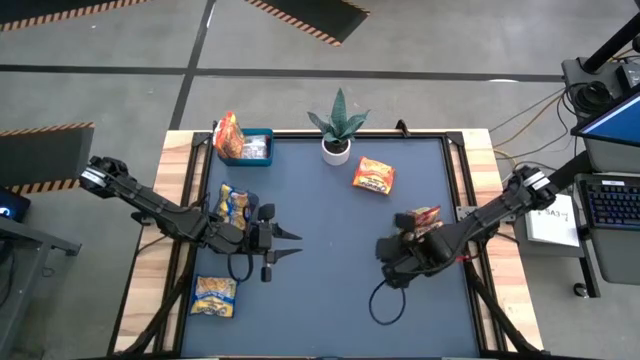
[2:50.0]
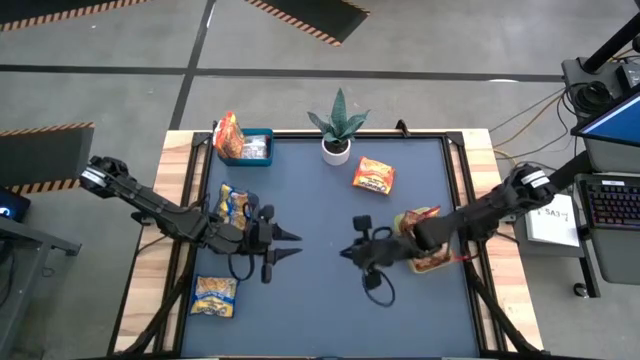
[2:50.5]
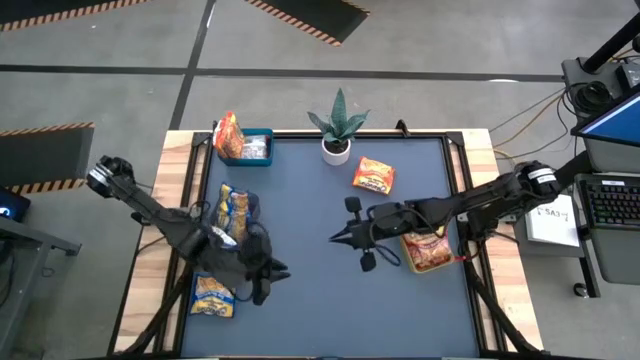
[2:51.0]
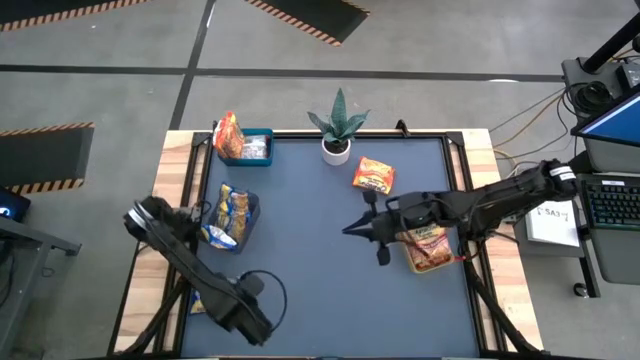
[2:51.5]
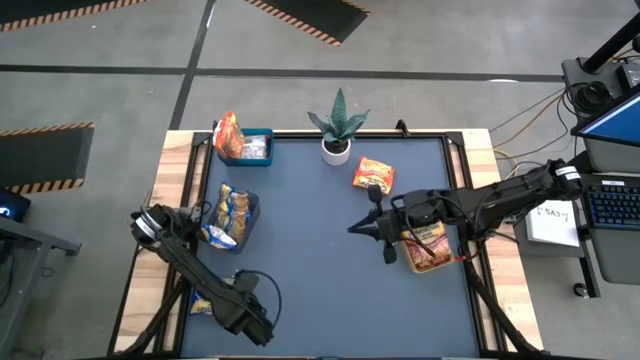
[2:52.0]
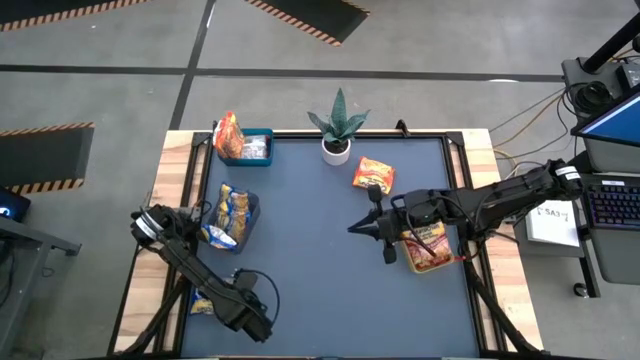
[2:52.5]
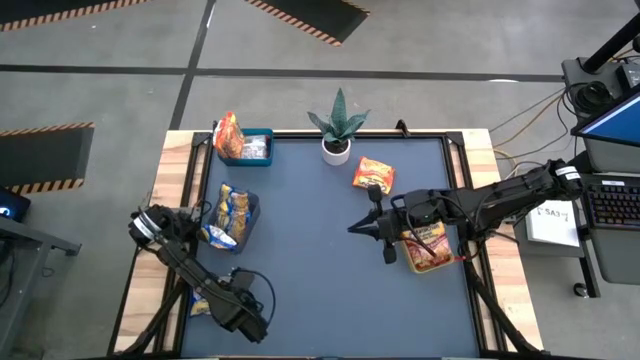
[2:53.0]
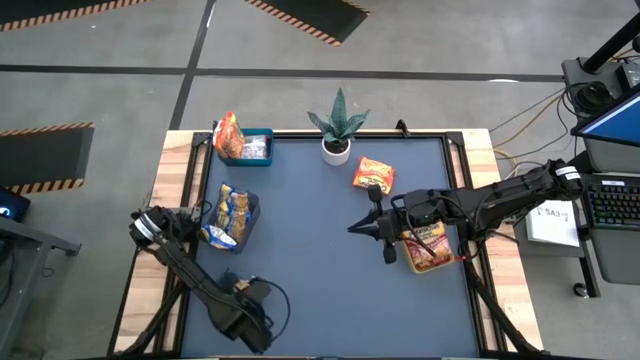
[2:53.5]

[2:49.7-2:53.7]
Task: Sort Maruchan noodles
Put the blue noodle pack into the black bin

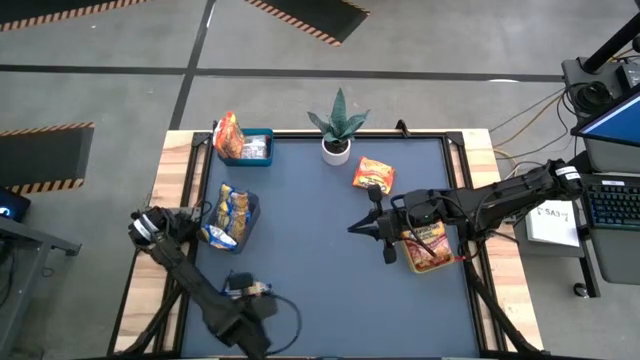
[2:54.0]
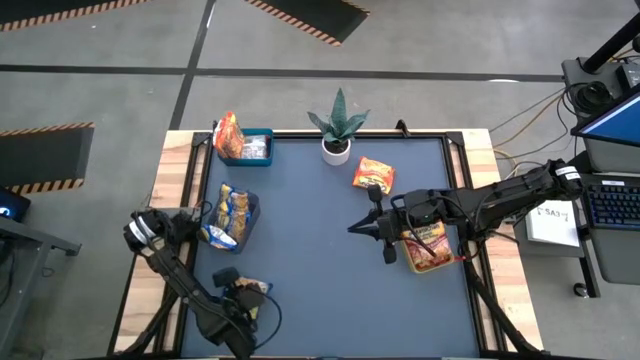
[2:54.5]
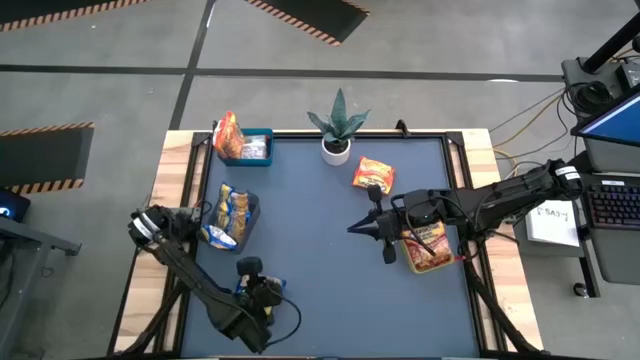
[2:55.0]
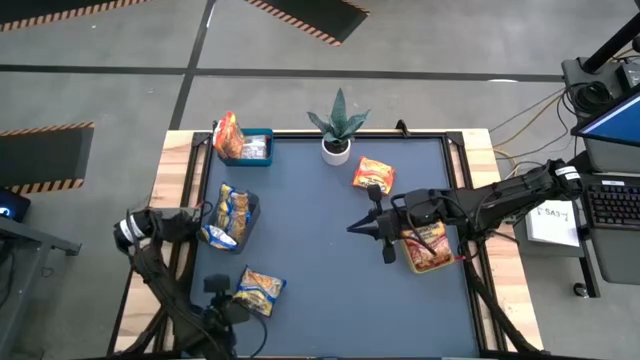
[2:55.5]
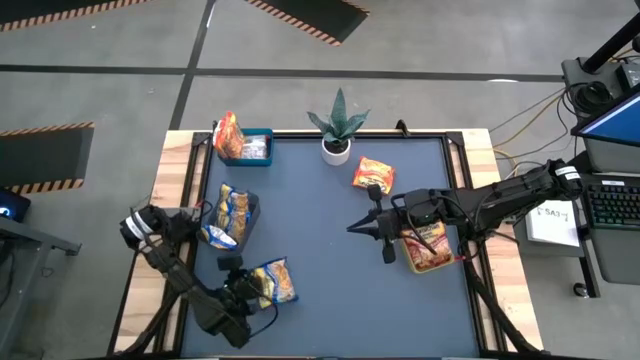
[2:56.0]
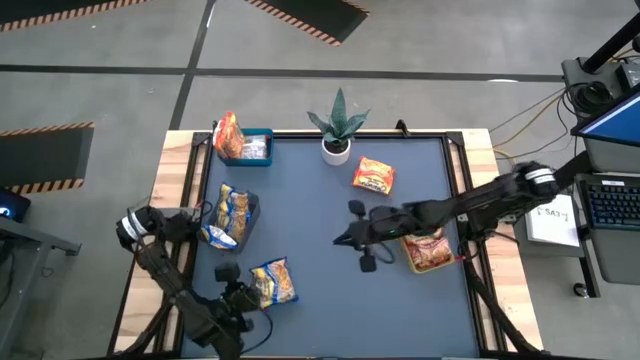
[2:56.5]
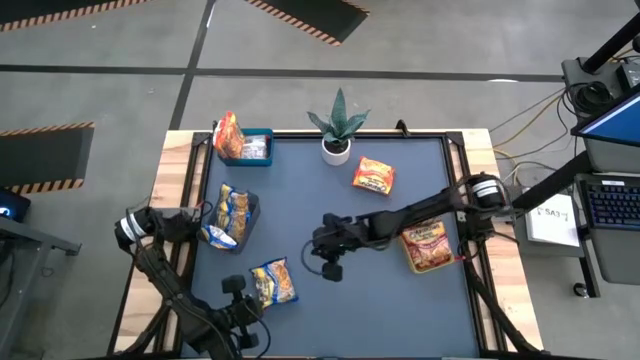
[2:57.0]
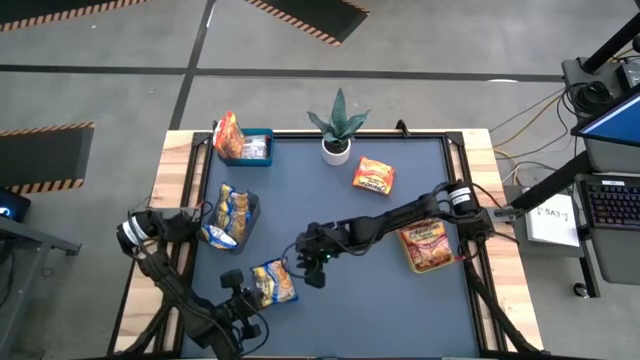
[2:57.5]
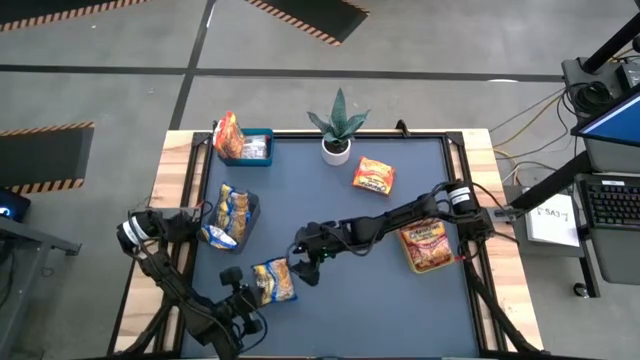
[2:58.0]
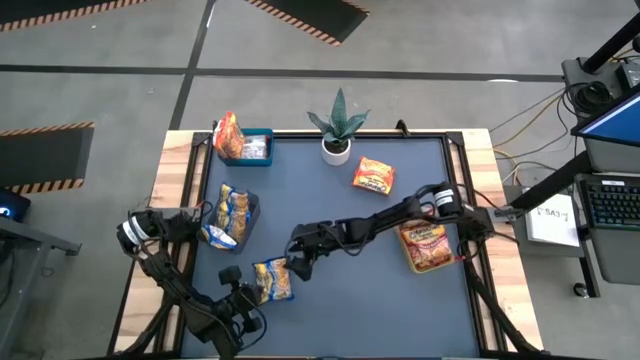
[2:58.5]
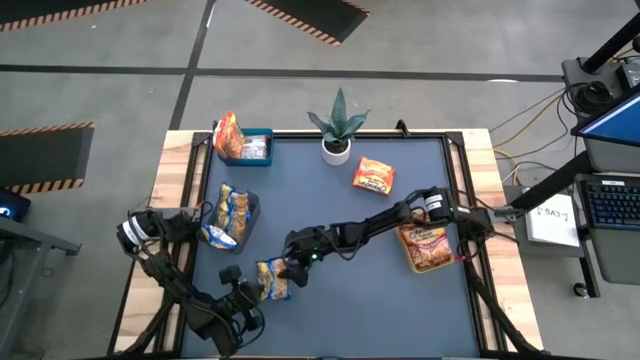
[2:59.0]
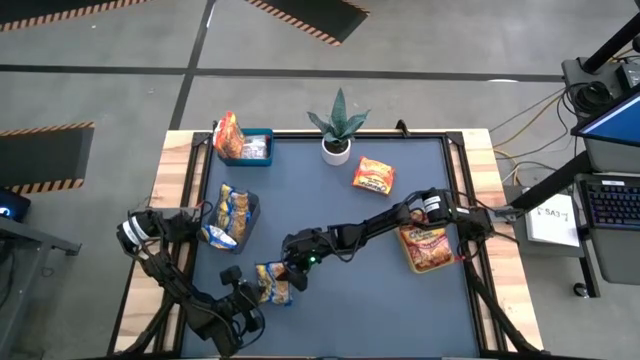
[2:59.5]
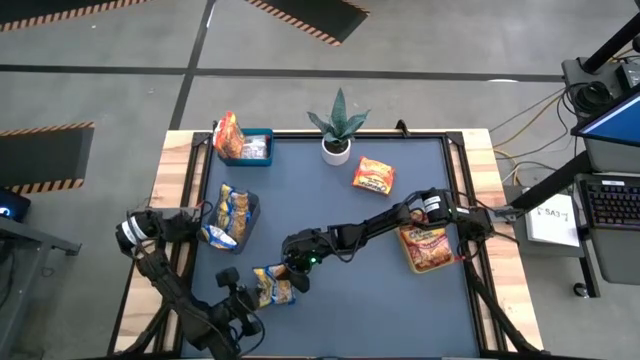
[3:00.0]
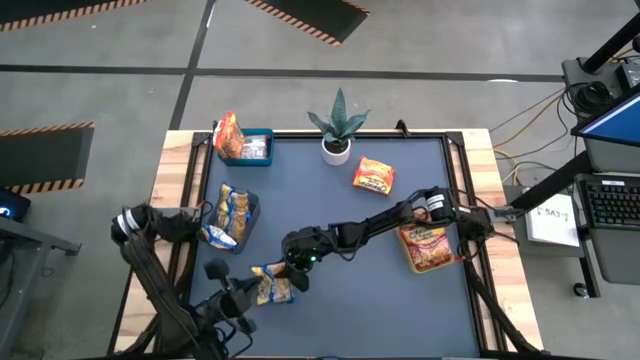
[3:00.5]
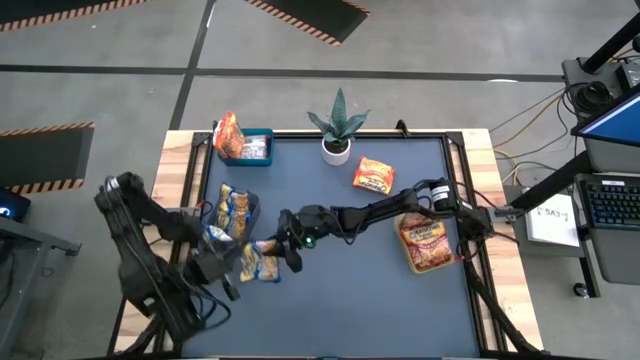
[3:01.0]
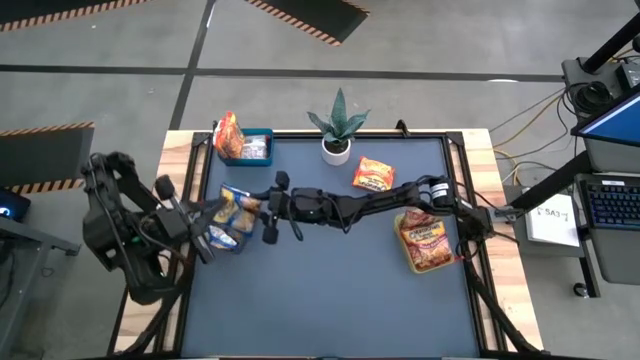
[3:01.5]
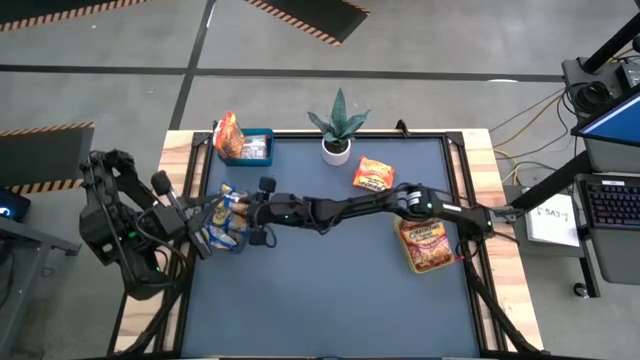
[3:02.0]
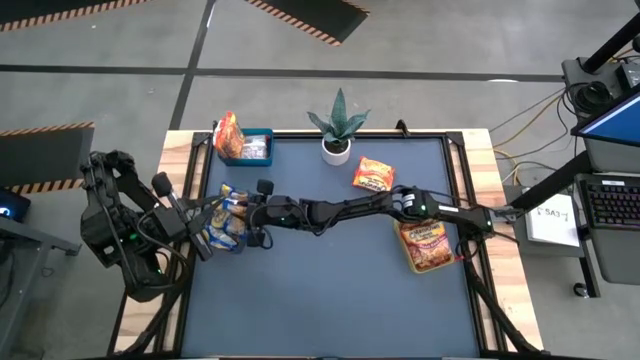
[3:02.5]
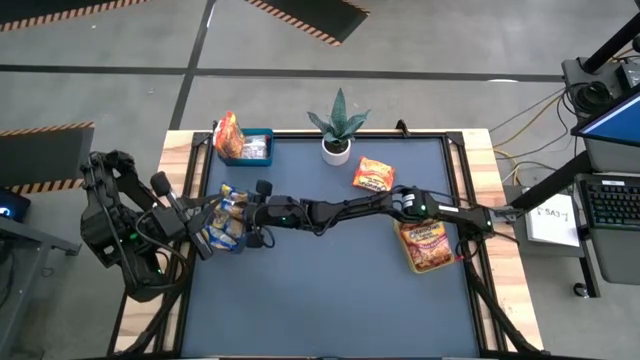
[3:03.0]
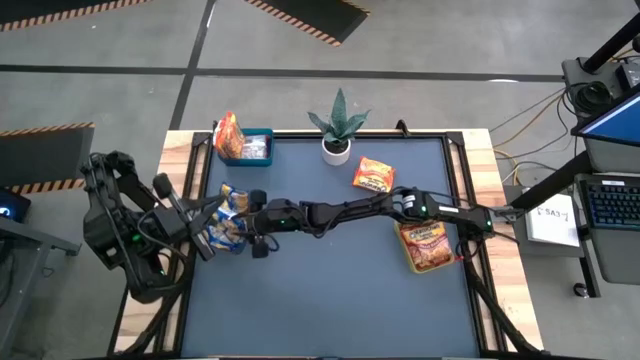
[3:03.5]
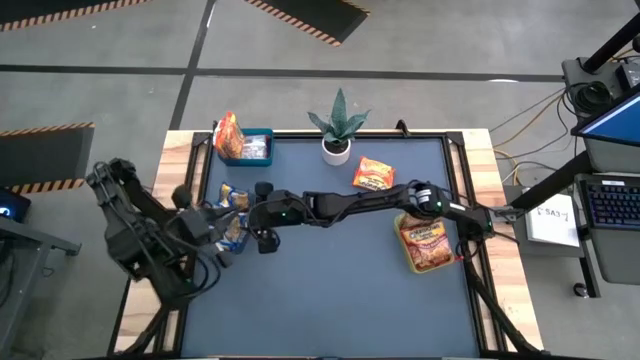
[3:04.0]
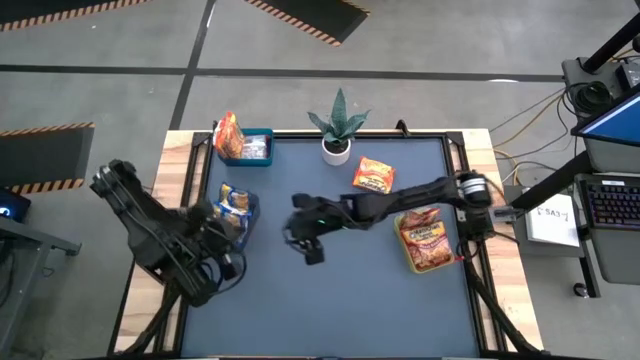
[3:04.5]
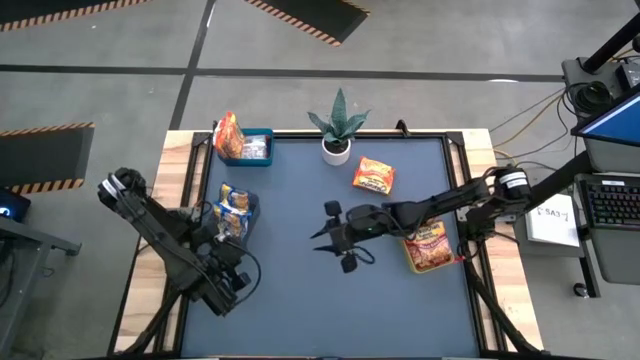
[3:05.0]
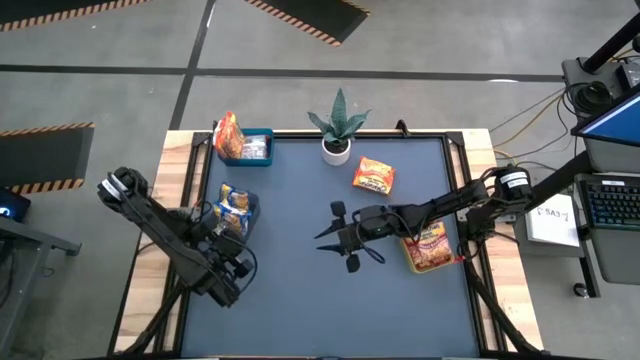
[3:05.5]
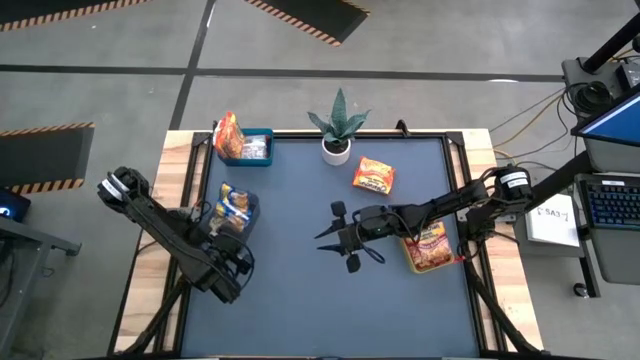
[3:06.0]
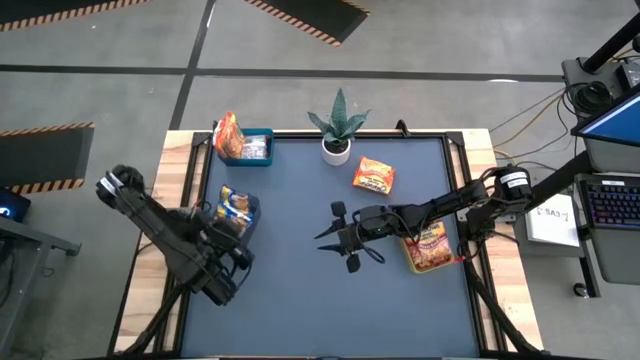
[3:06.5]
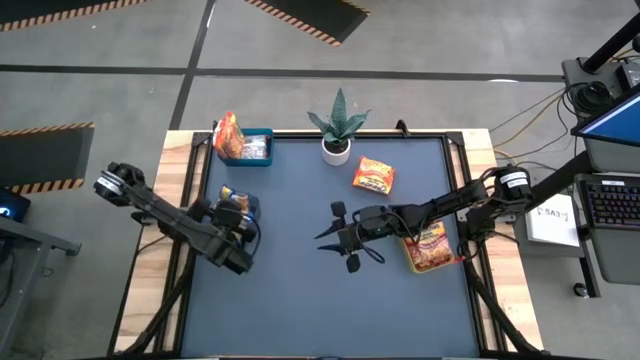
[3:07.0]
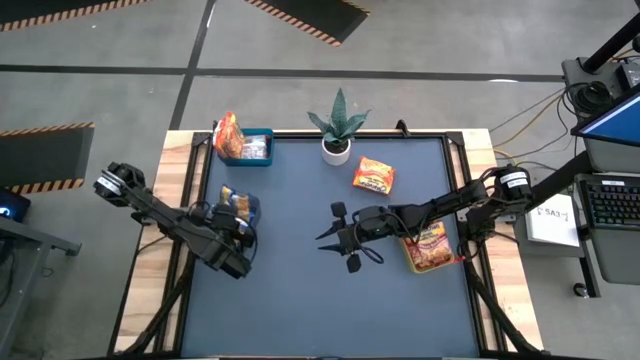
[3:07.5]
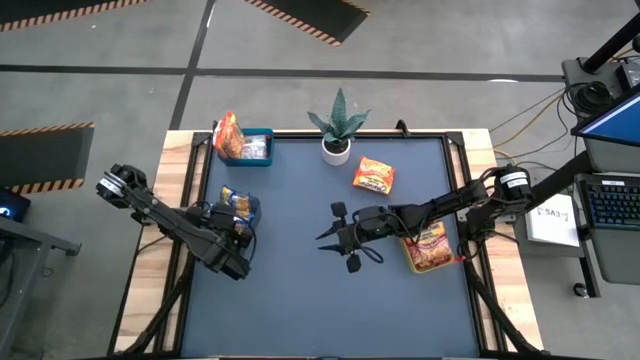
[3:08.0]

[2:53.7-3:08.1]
Put the blue noodle pack into the black bin

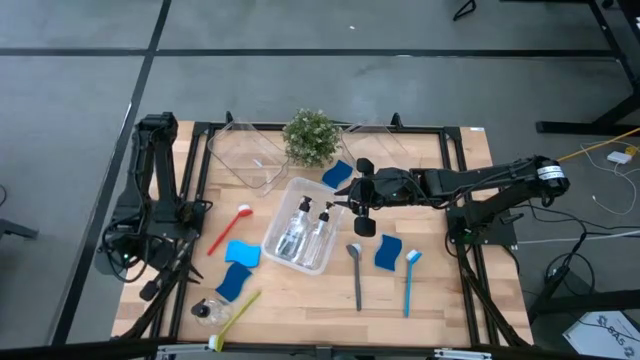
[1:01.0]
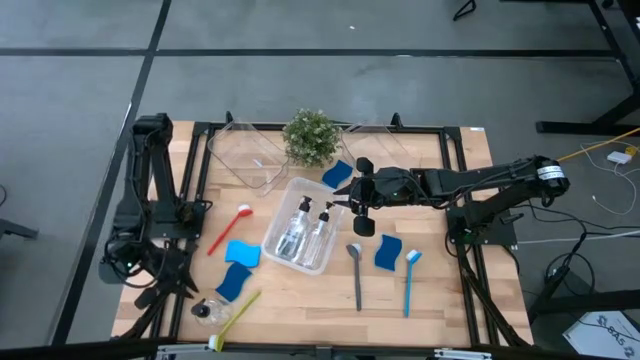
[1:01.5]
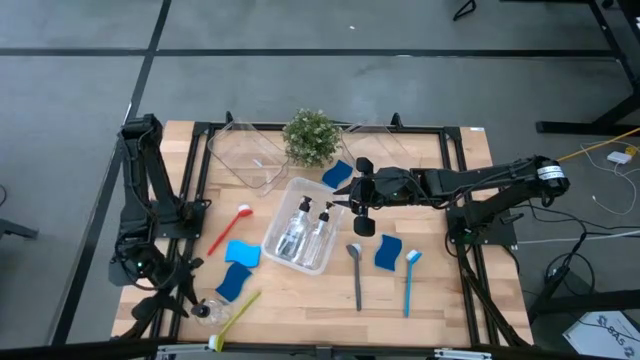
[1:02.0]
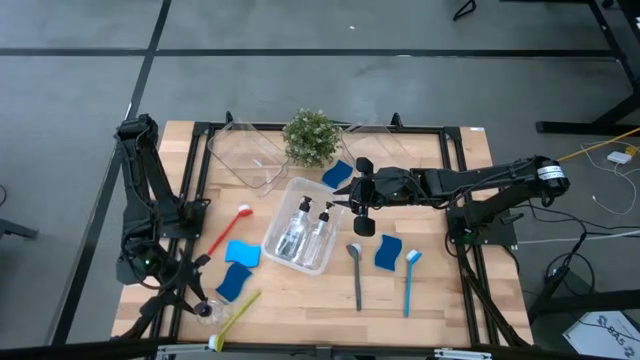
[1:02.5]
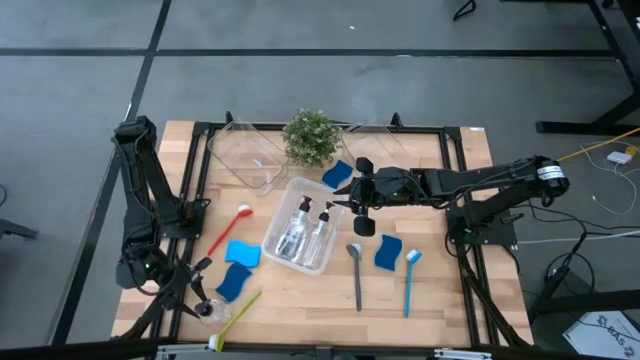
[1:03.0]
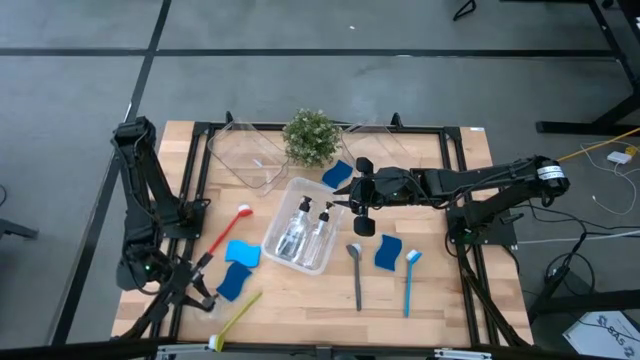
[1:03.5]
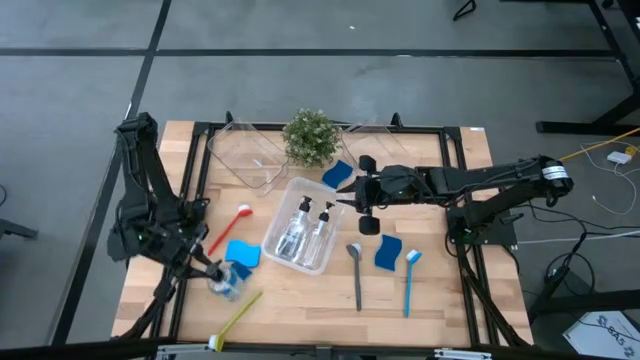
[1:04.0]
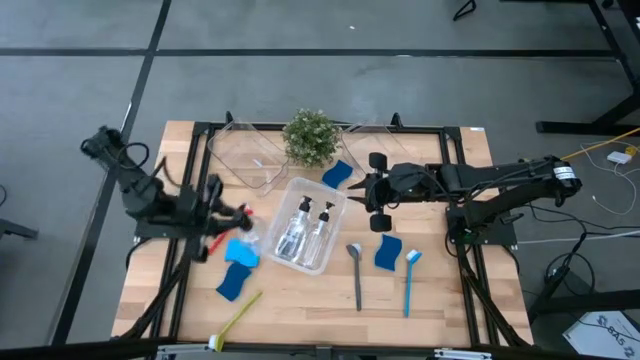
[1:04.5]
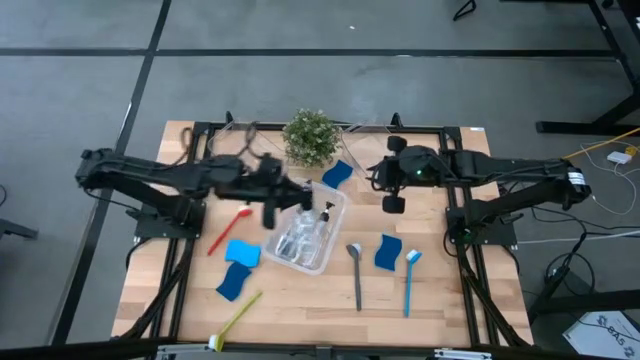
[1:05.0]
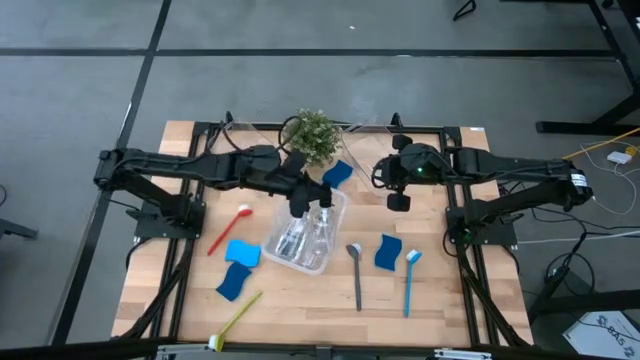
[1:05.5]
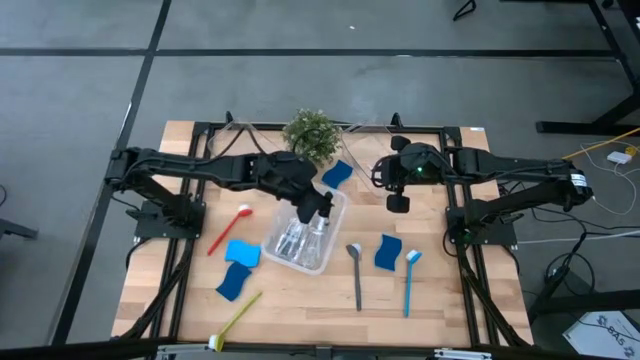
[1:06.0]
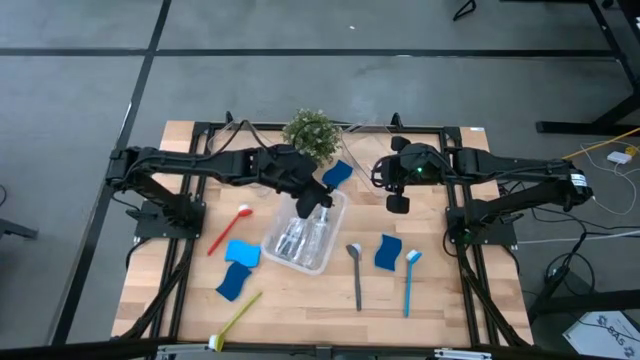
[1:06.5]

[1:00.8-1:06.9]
Task: Pick & Place Kitchen Sink Supplies
Put the liquid dispenser bottle into the white bin
